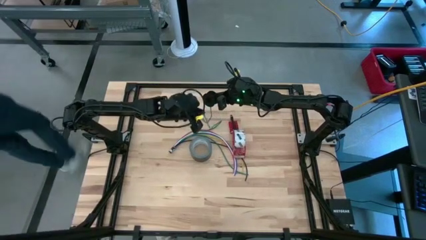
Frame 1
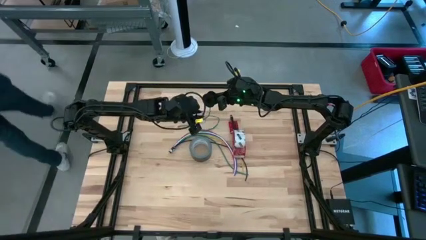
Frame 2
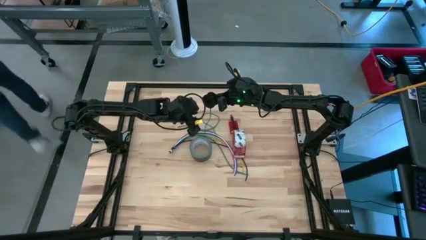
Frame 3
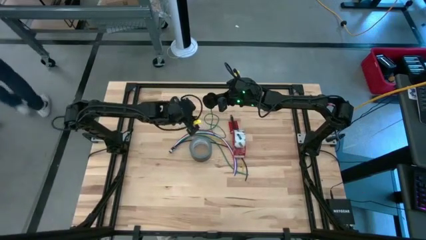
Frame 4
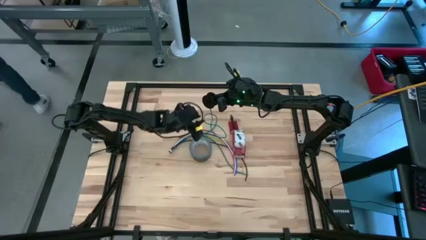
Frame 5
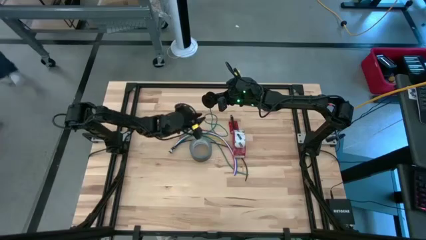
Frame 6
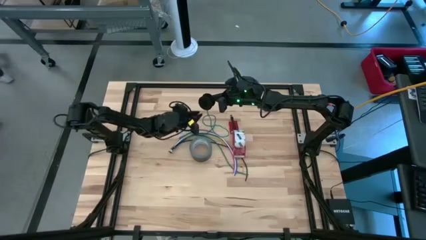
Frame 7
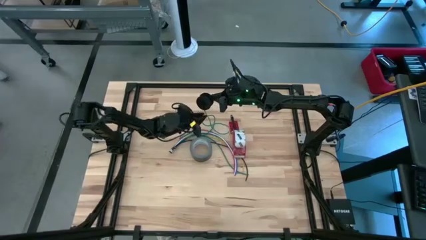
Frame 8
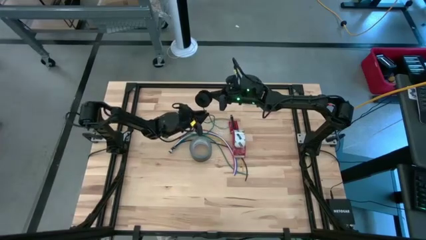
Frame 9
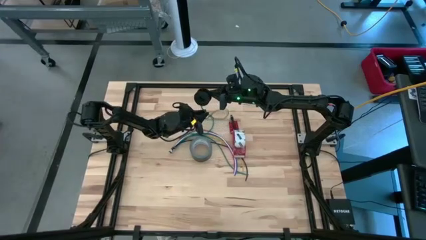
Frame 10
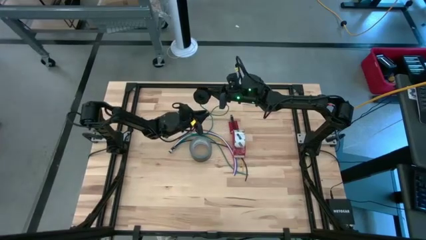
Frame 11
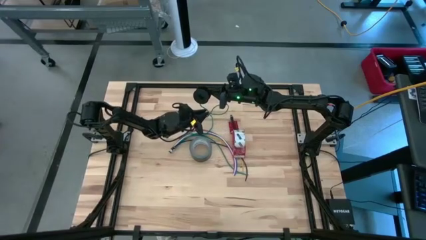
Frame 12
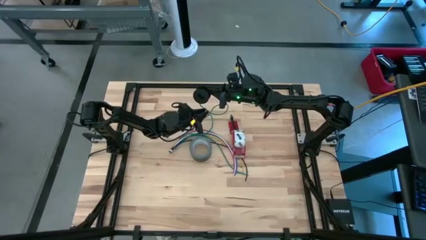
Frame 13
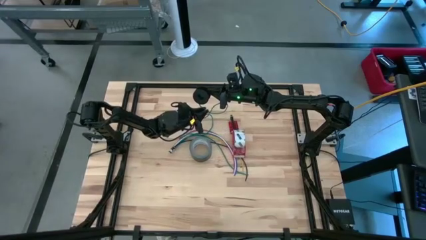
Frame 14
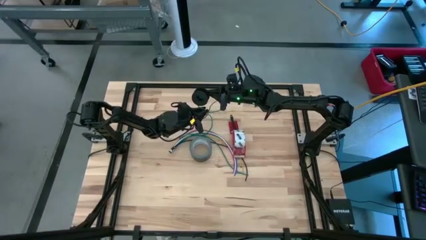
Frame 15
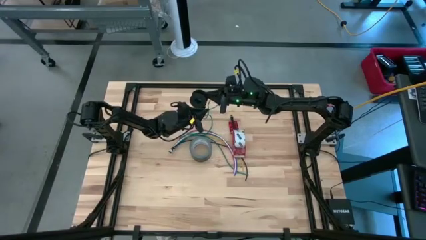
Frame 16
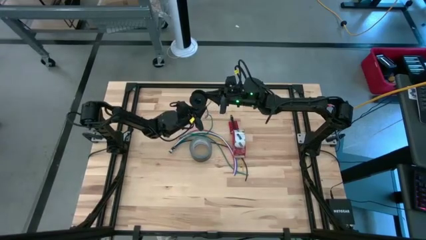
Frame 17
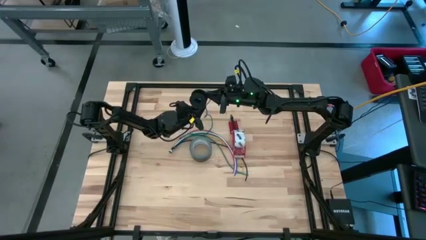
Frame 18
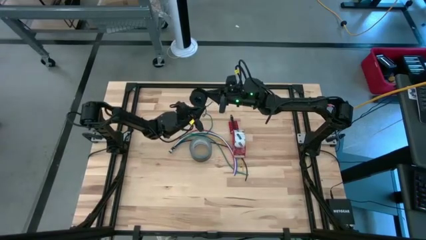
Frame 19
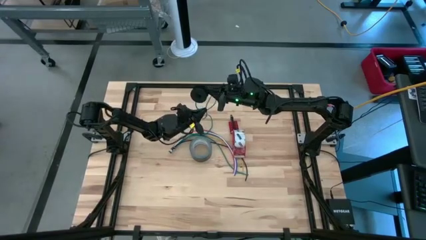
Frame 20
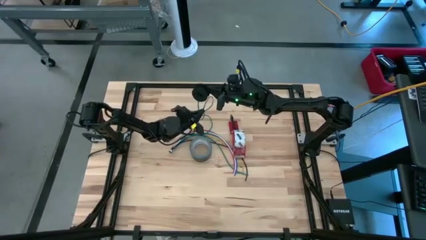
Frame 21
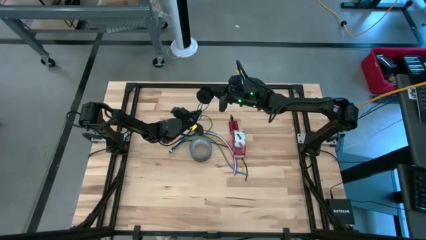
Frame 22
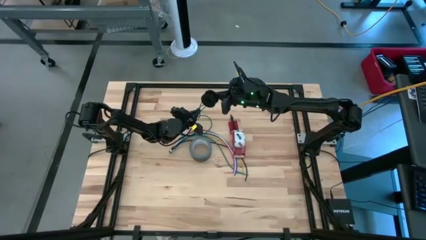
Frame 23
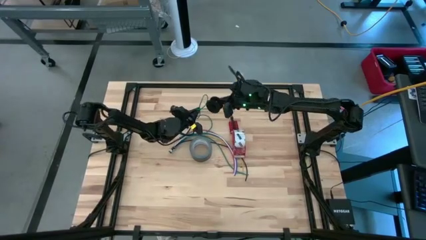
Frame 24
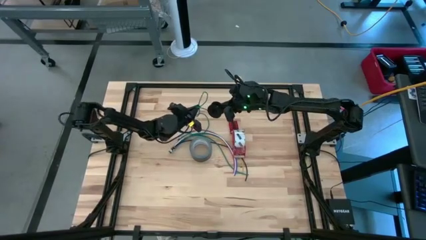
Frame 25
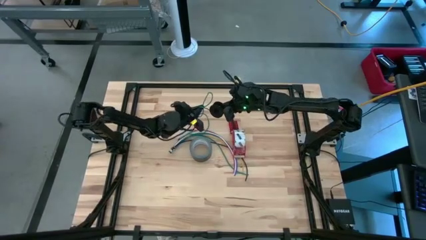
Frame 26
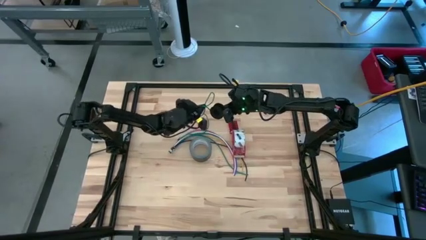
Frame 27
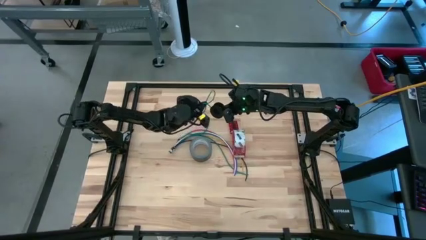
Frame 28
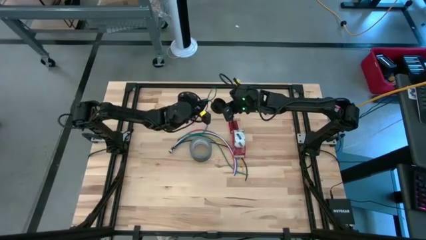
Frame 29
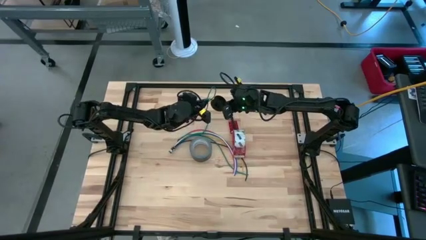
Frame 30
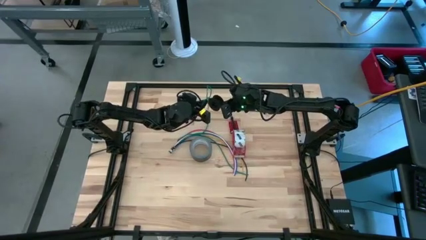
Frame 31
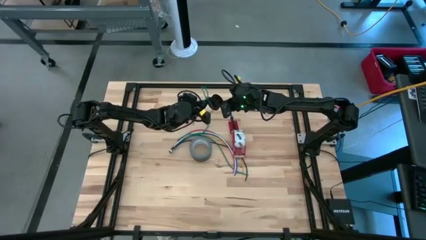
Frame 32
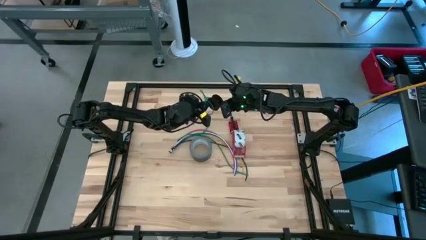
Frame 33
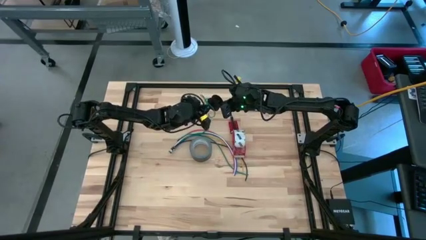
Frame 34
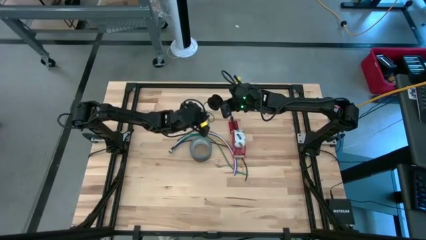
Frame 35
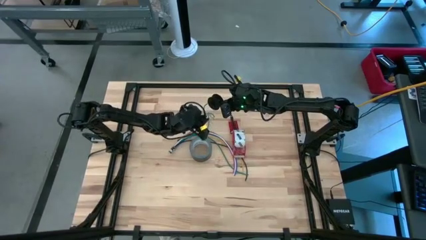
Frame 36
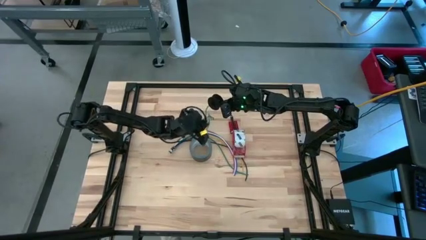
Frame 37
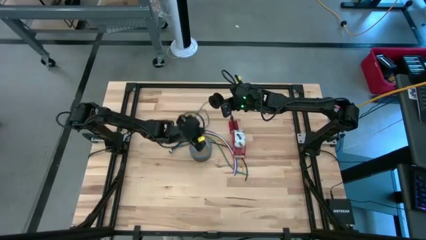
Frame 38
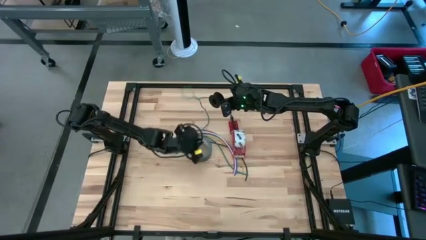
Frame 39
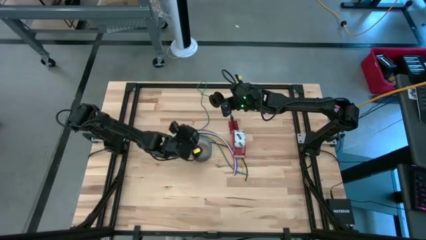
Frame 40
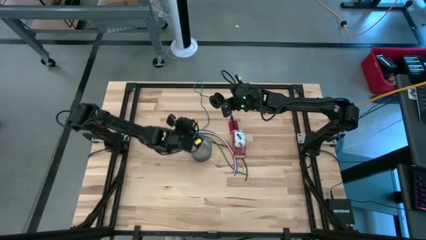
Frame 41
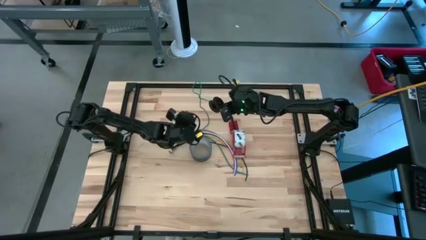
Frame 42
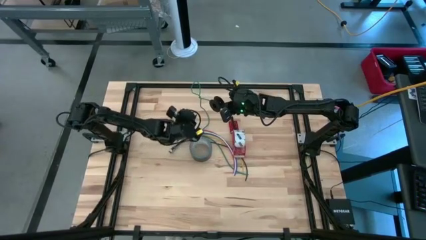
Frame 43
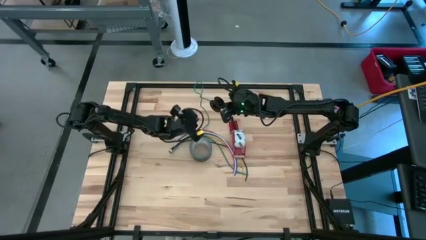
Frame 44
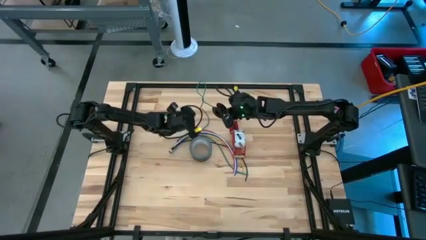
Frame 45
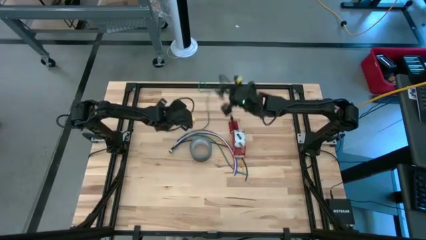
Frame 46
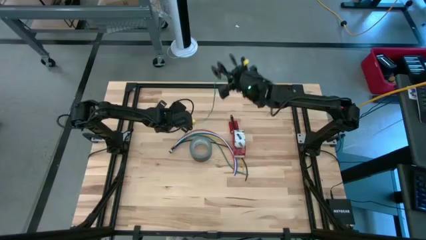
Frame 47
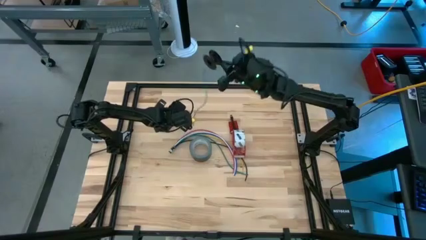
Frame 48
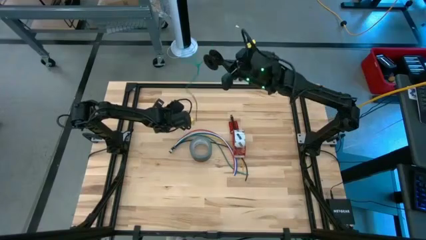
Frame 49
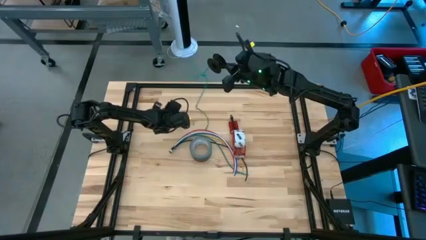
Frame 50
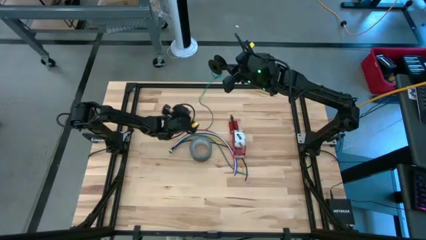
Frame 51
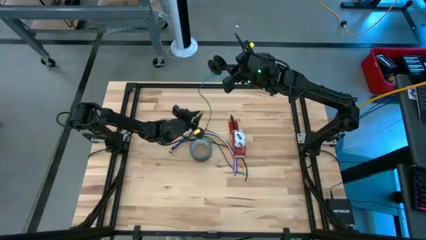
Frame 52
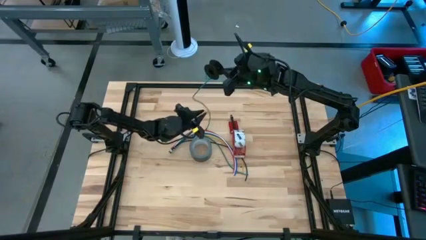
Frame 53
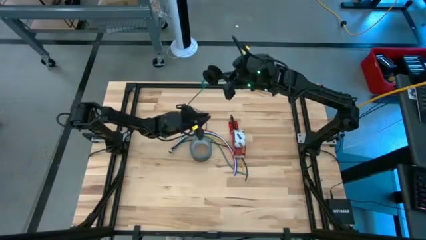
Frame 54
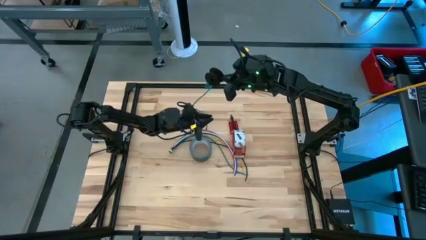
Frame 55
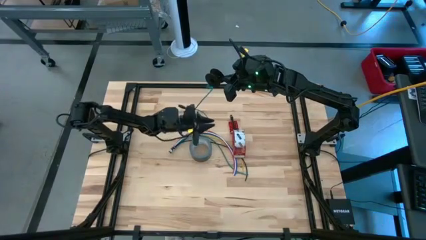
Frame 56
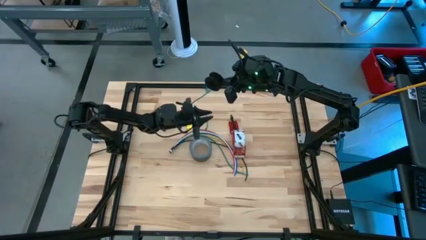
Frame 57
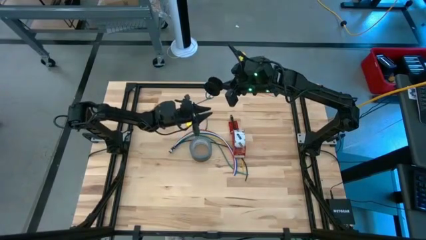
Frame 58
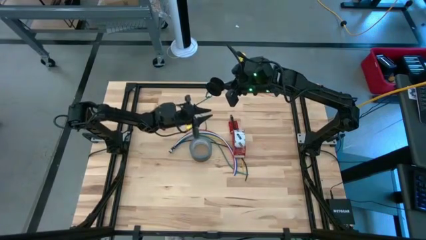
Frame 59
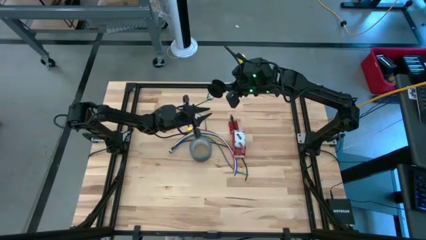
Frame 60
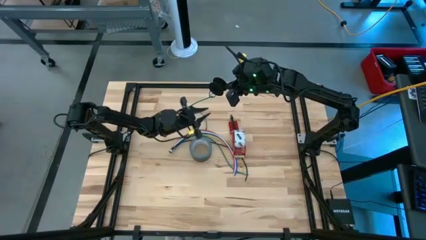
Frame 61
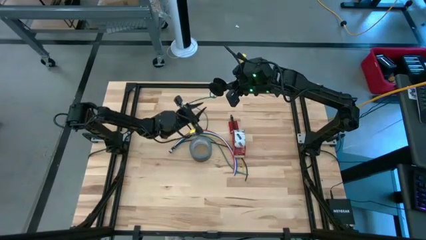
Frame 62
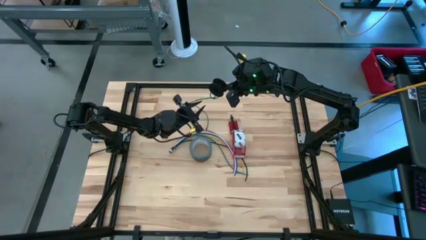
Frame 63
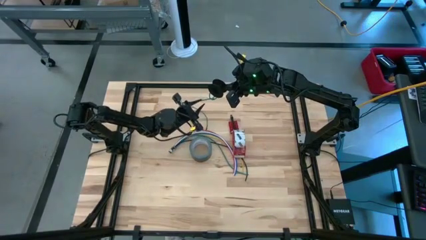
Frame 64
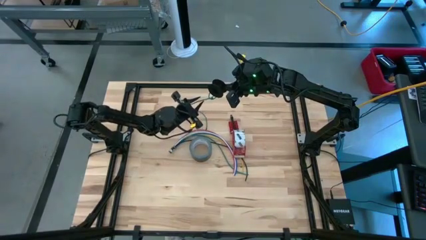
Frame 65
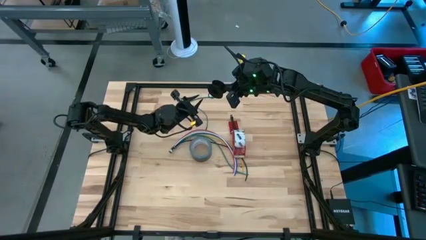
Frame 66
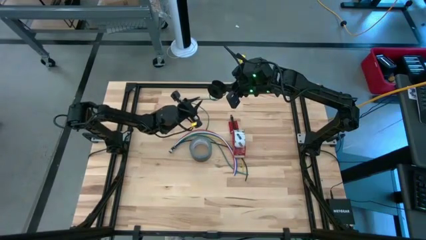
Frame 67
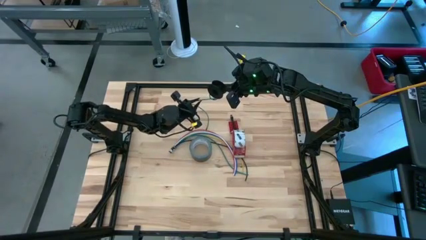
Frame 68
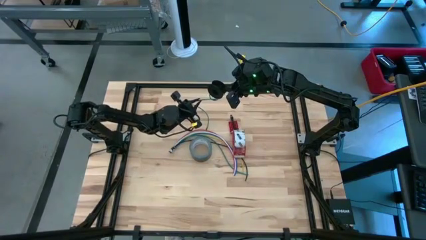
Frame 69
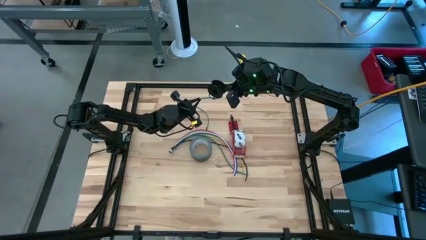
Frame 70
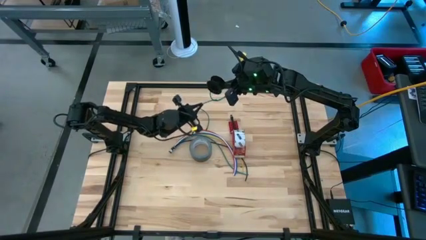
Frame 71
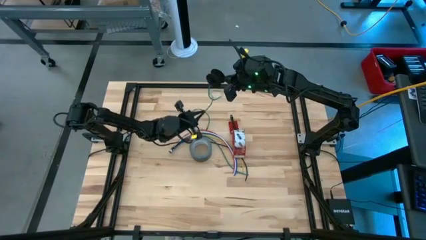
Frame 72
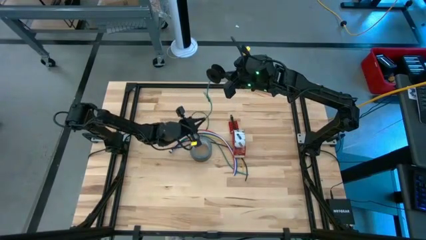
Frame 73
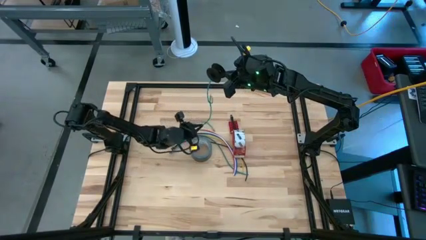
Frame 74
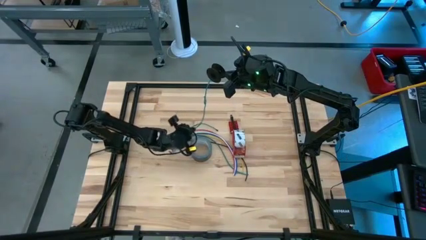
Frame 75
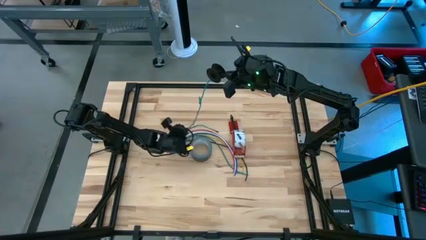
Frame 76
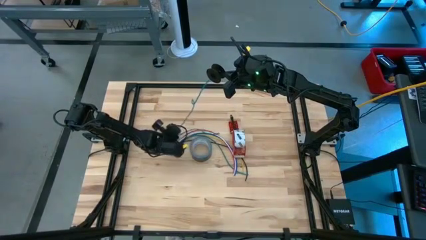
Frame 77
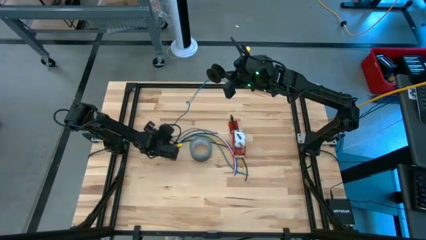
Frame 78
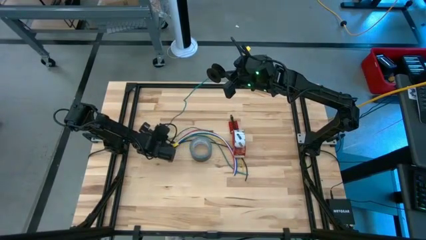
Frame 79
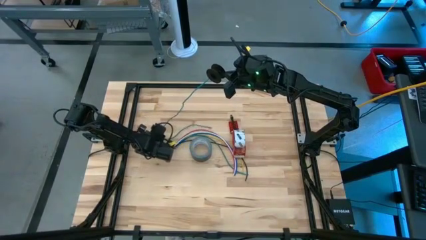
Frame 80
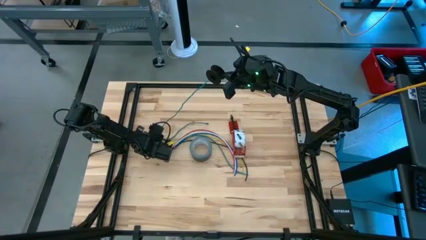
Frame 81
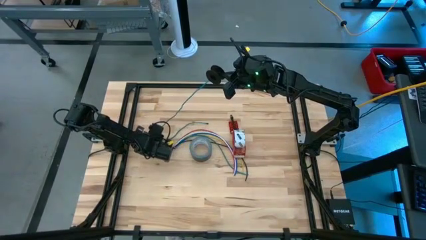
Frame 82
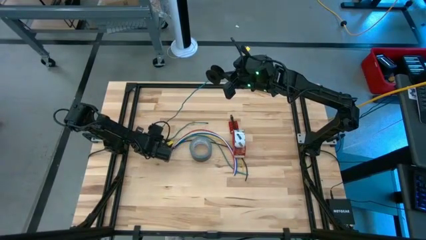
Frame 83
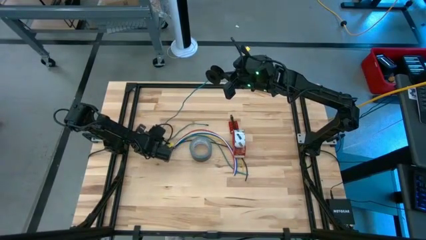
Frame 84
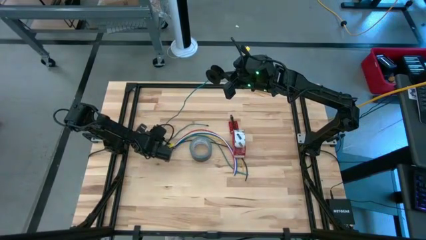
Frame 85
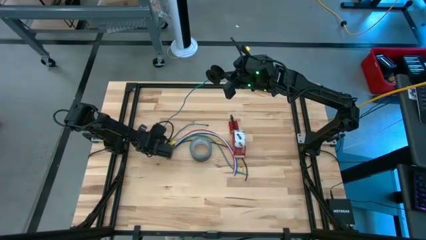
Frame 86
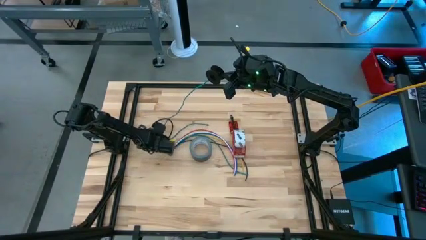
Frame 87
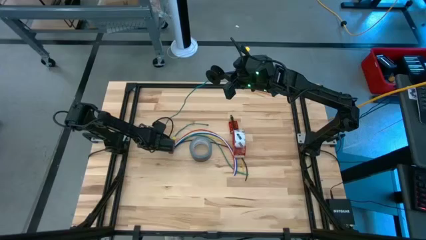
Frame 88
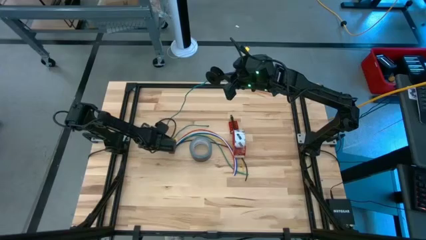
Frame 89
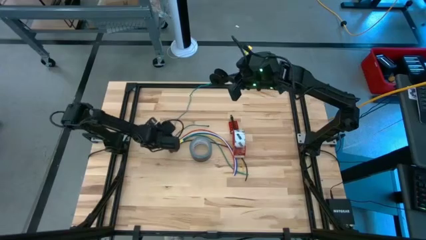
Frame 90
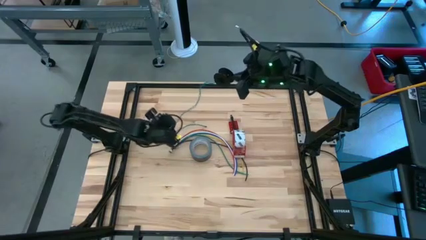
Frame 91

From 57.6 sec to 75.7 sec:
Task: Coil cords
Coil the green wire onto the black spool
